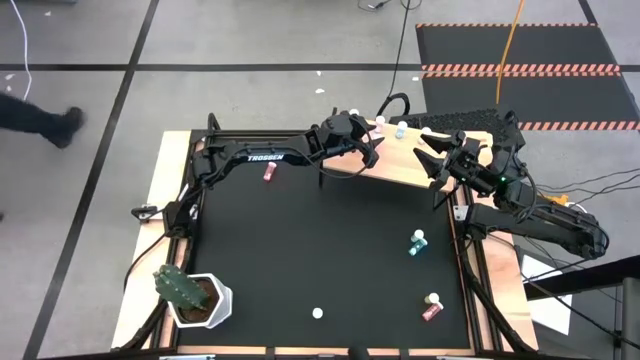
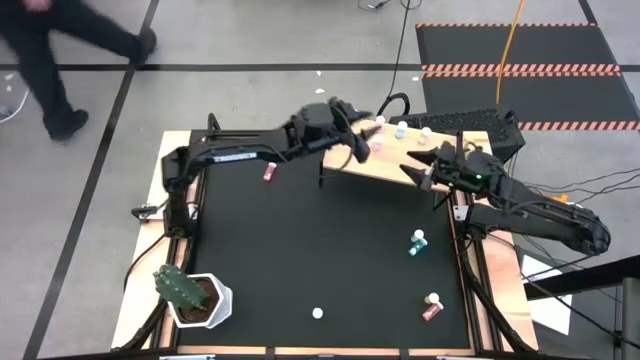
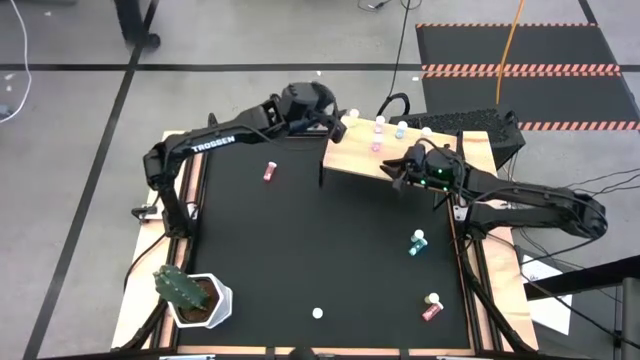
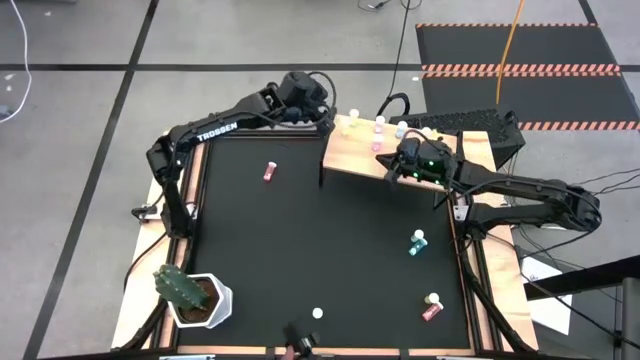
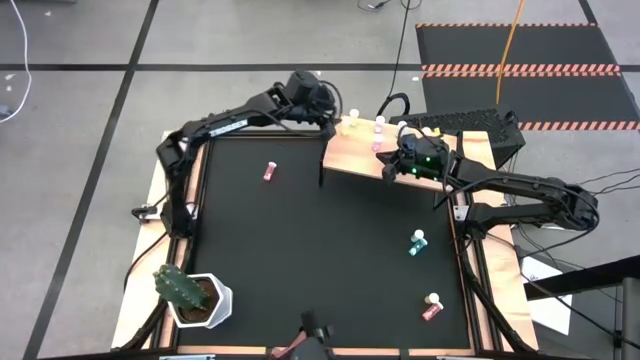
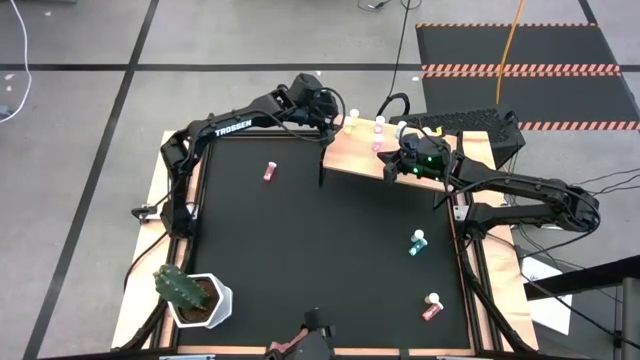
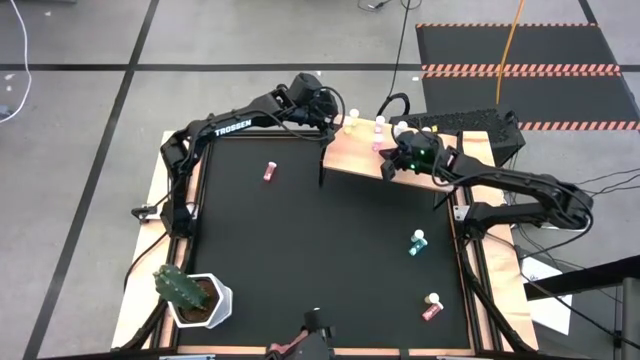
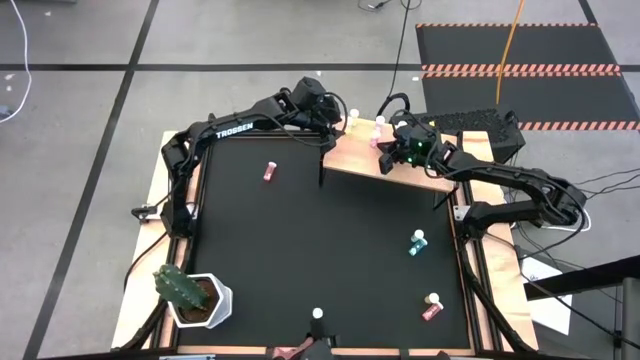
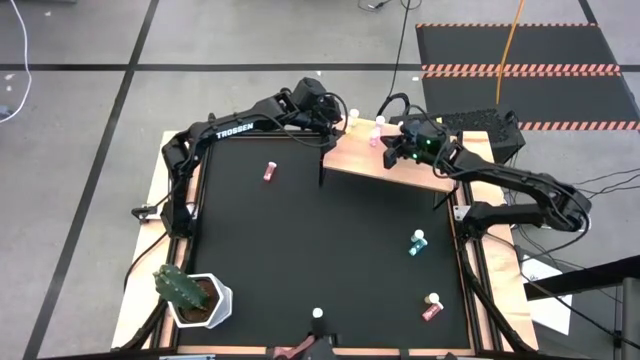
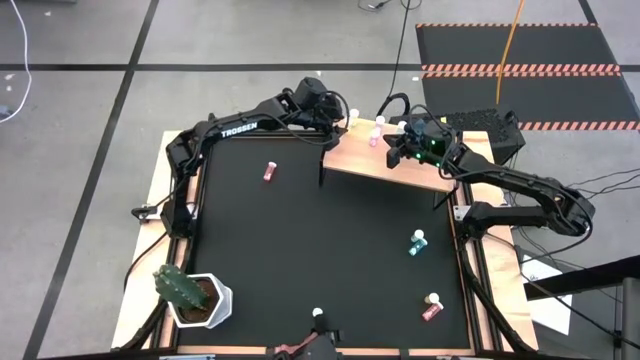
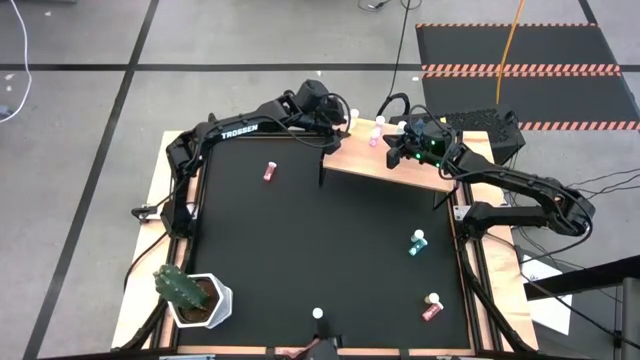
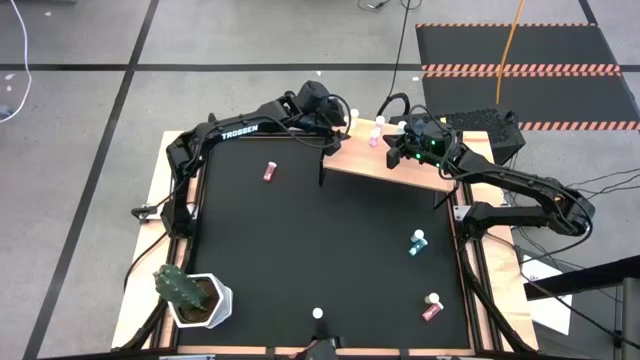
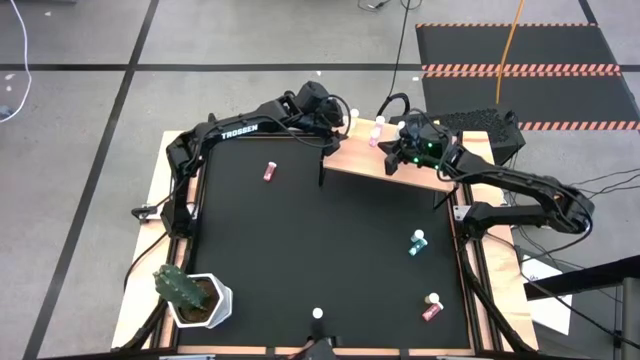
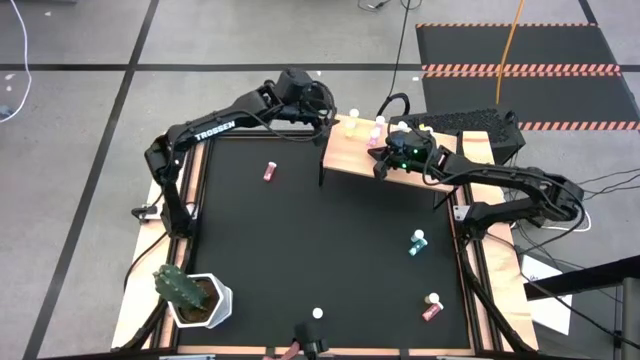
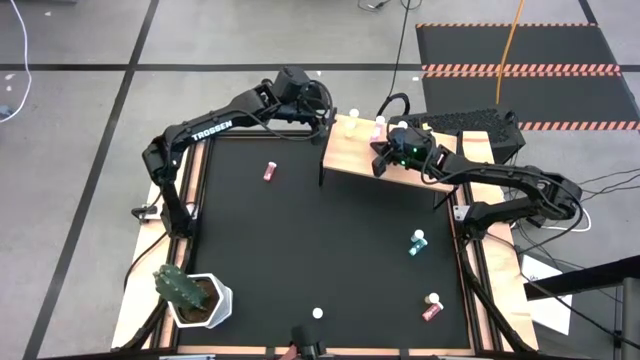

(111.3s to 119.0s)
Task: Pick and place medicine bottles onto shelf by color
Adjust the pill bottles on the shelf

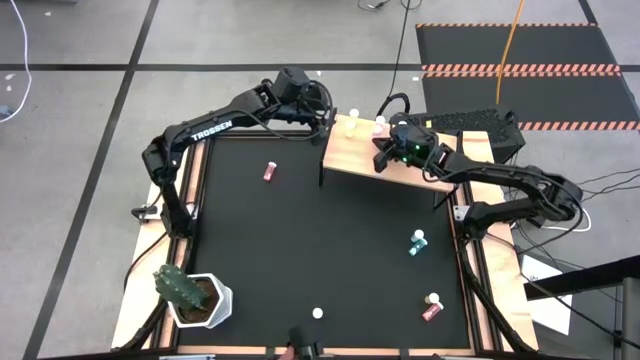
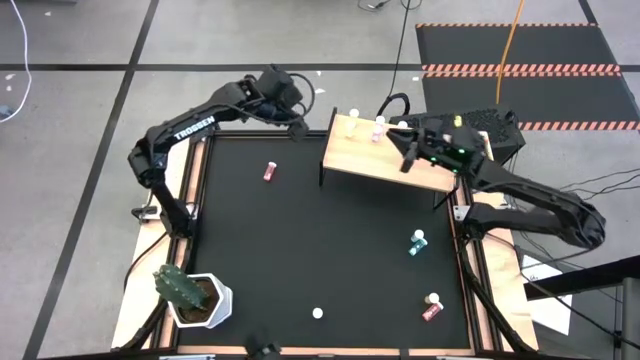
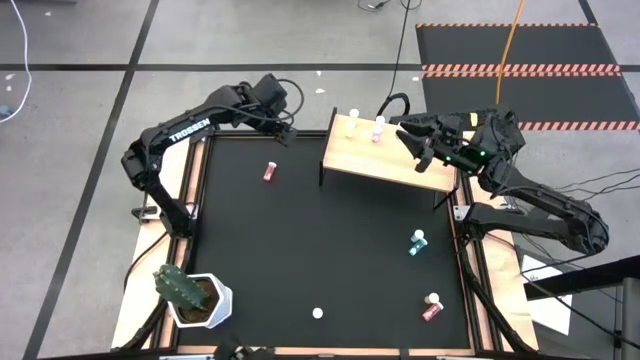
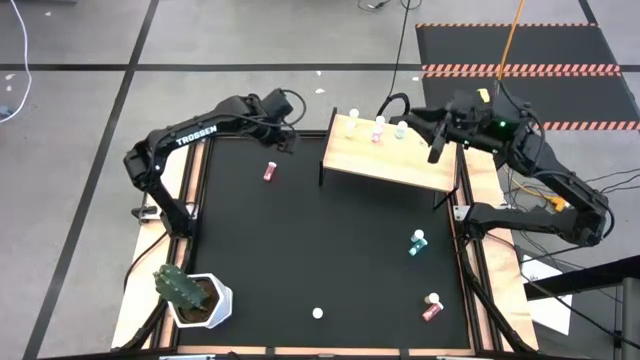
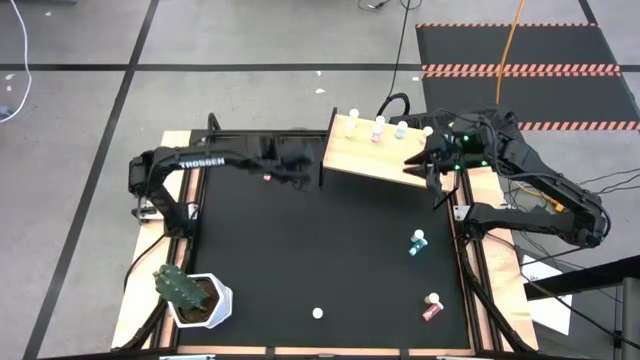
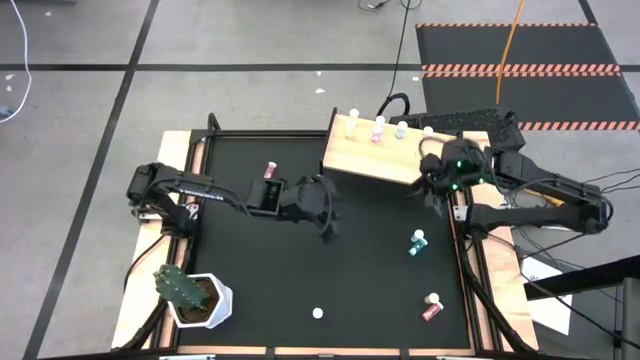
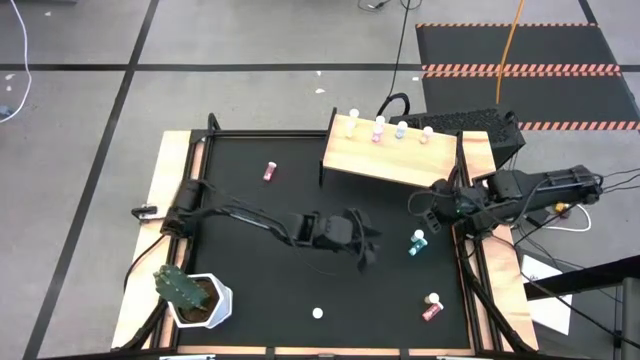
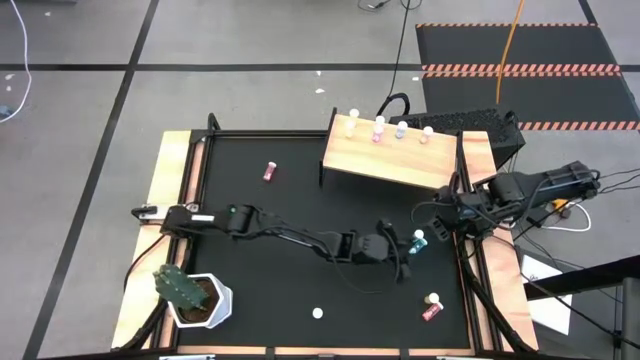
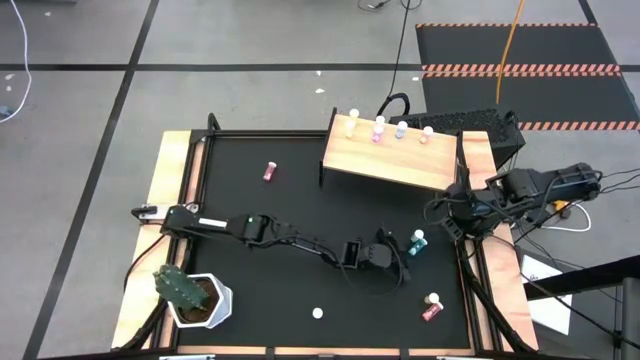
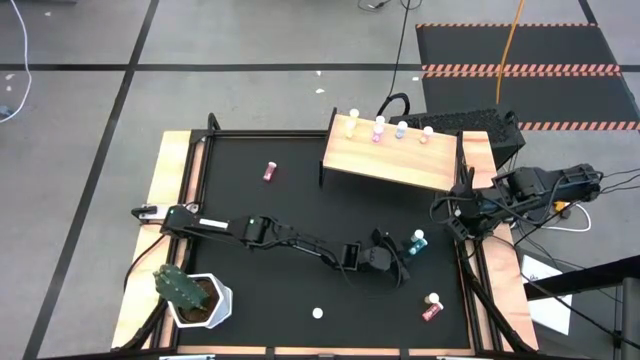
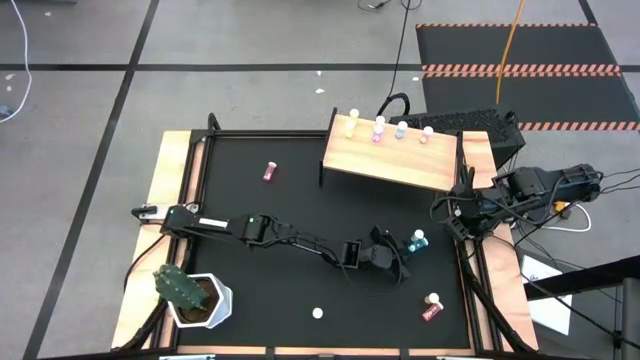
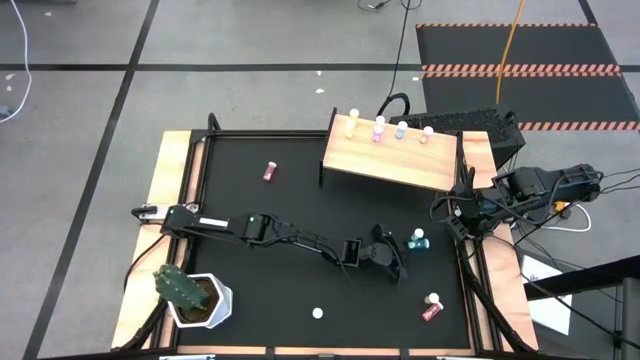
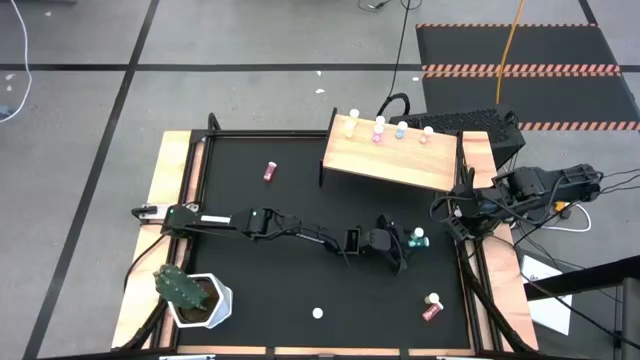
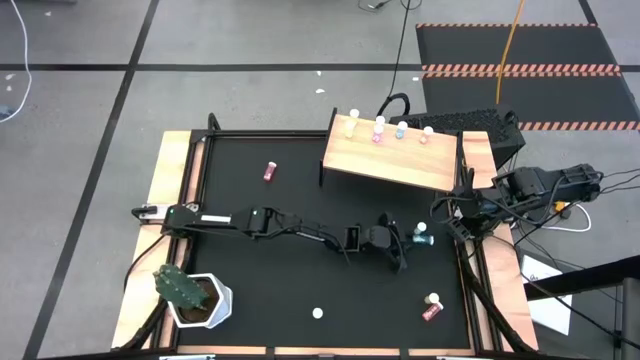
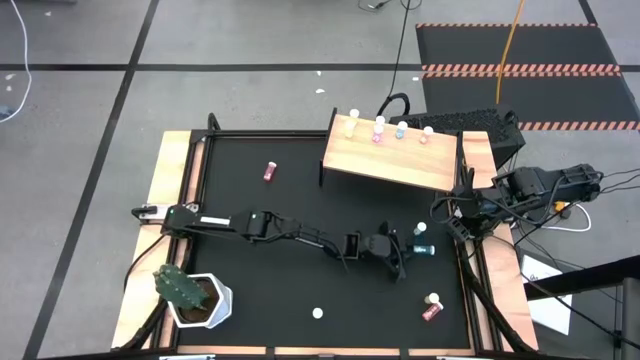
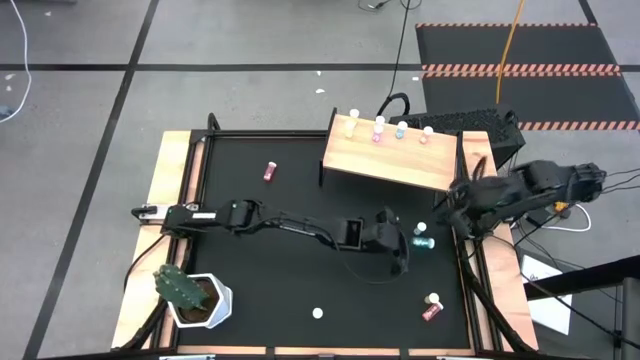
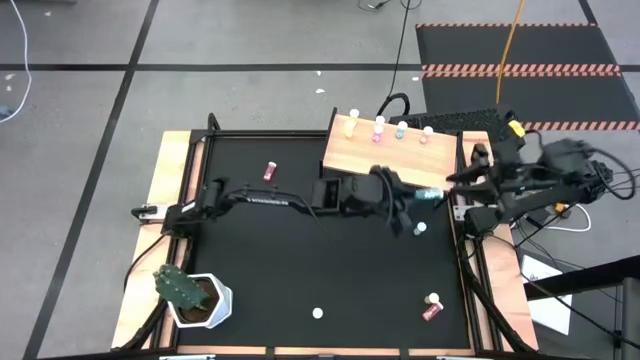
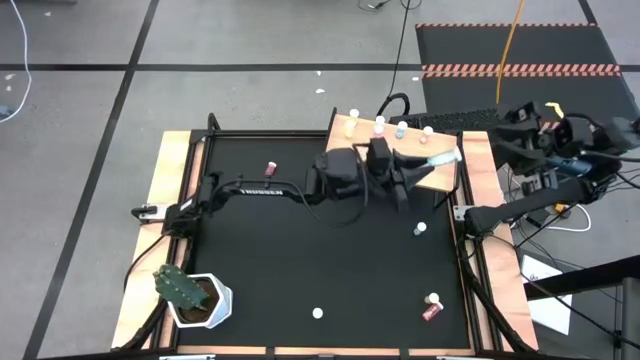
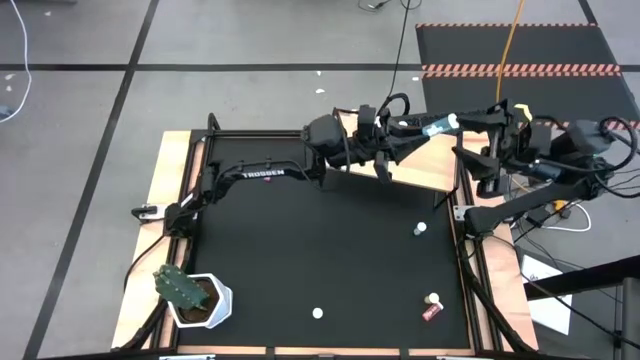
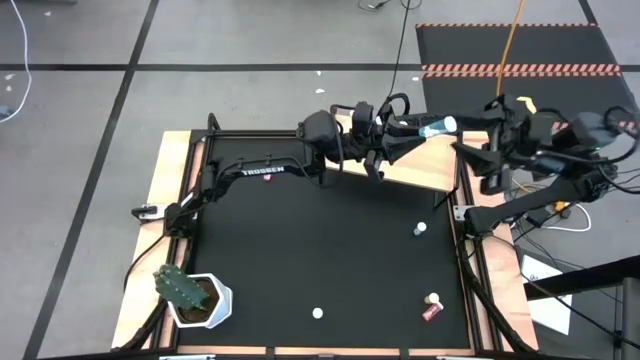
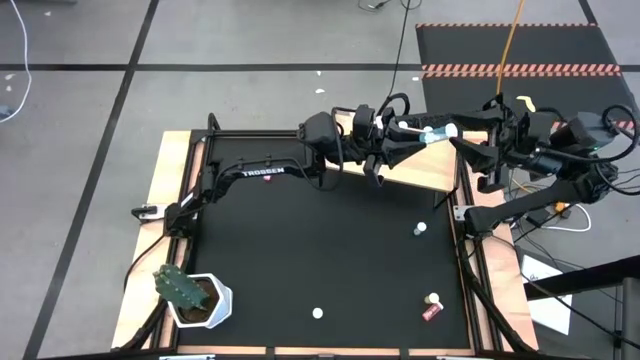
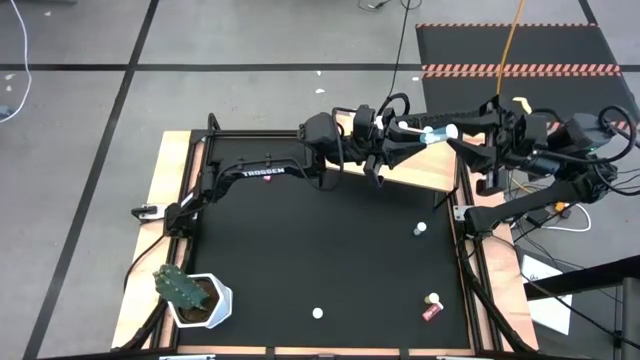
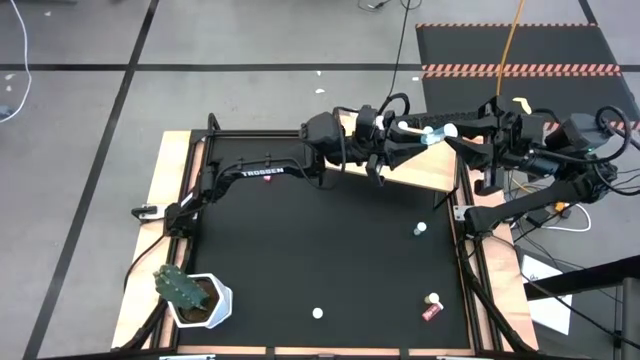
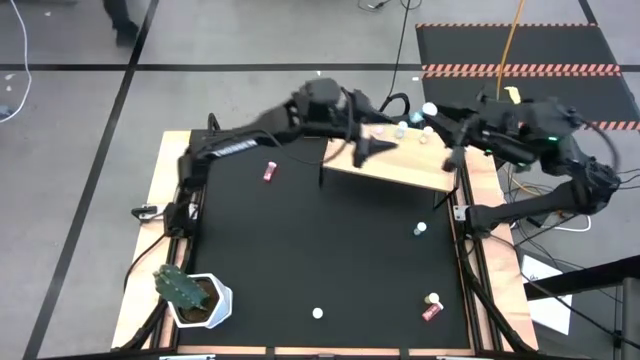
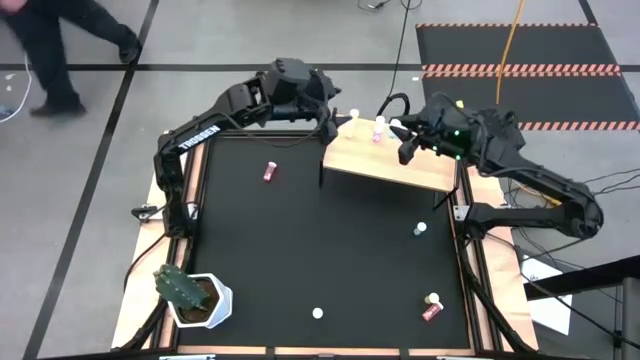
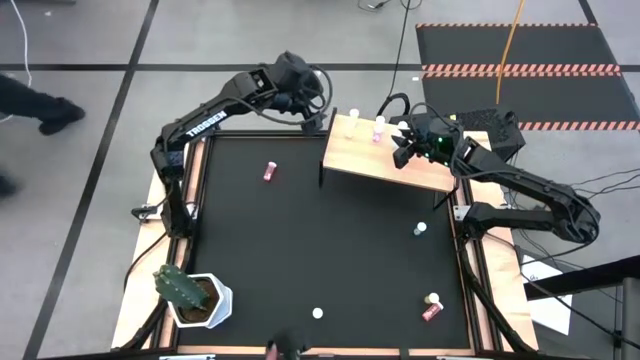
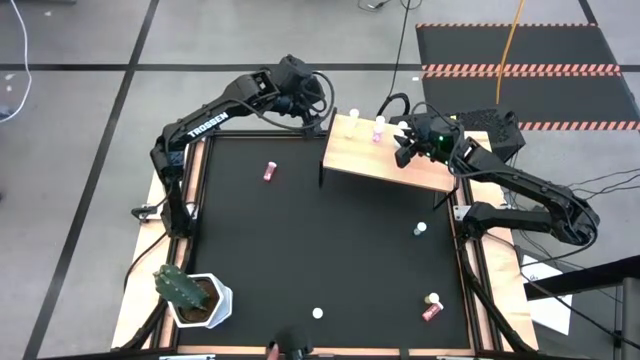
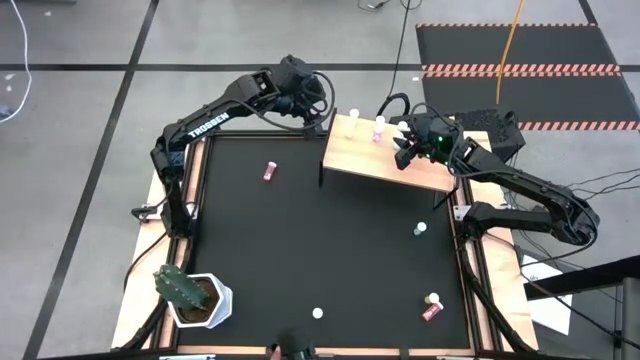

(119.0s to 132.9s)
Put the blue pill bottle on the shelf aligned with the other blue pill bottle

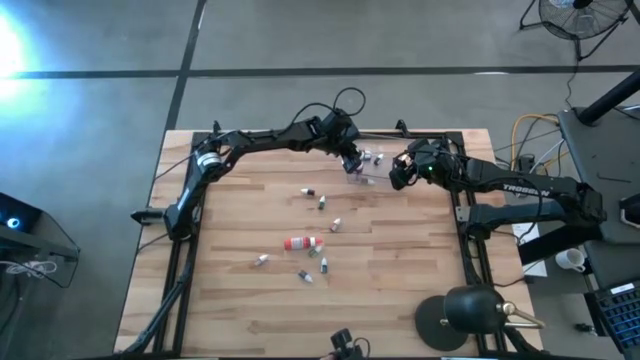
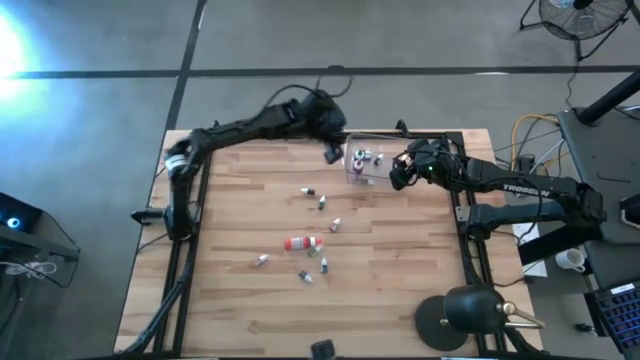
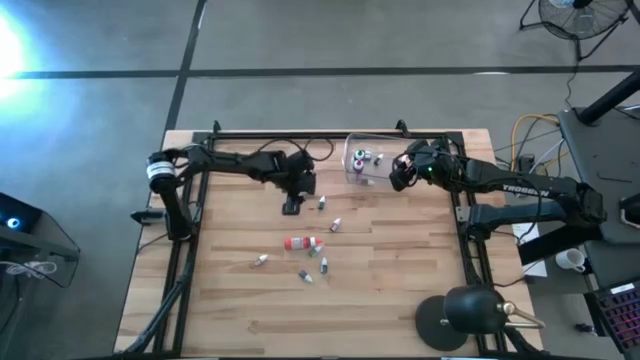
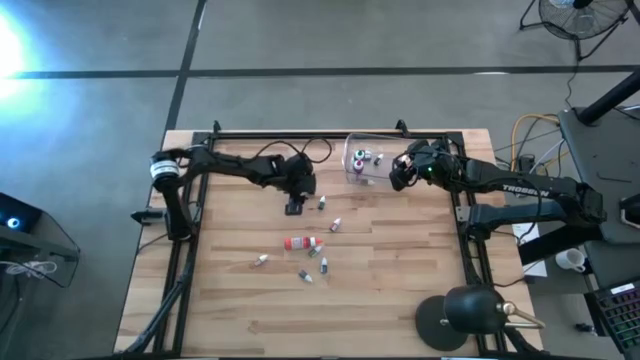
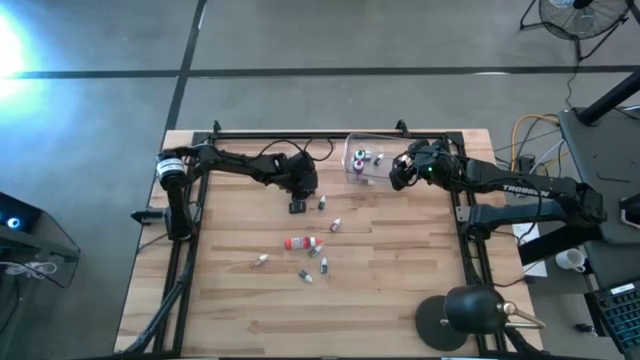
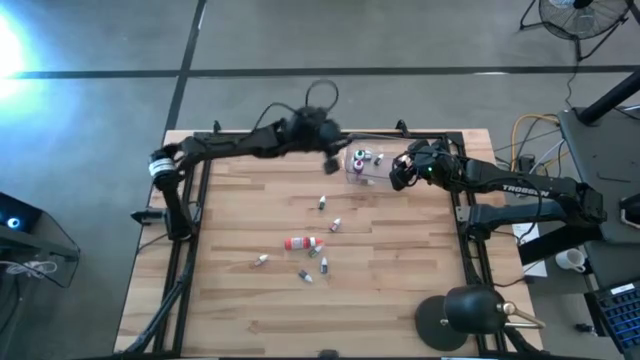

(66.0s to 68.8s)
Task: Pick & Place food coloring
Put the small black food coloring bottle into the transparent bin
